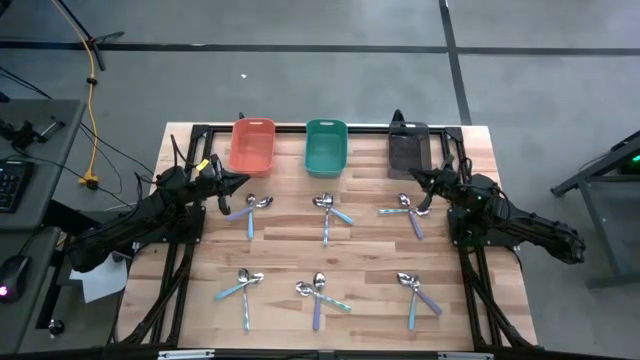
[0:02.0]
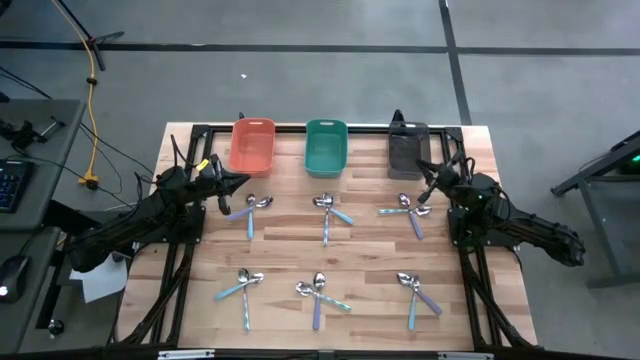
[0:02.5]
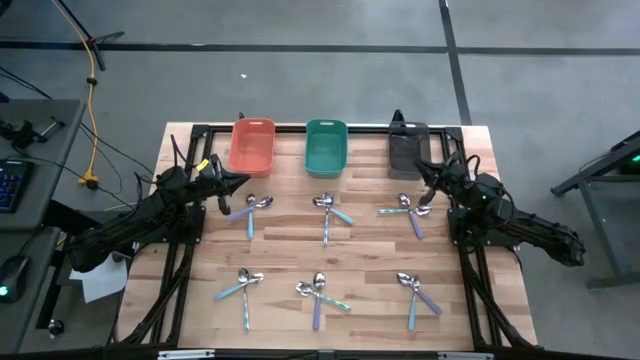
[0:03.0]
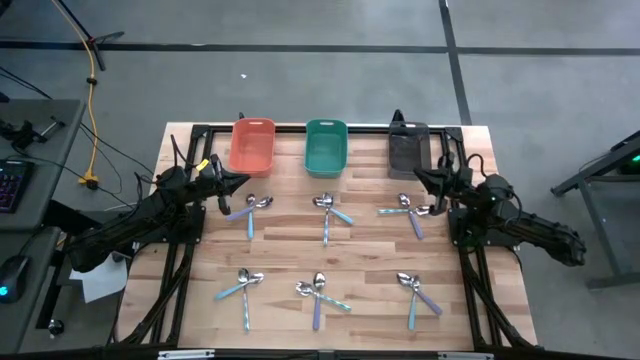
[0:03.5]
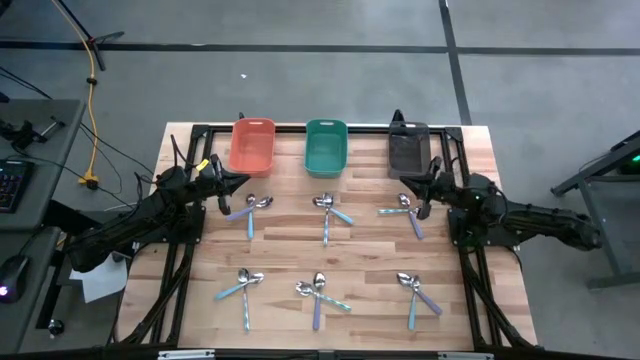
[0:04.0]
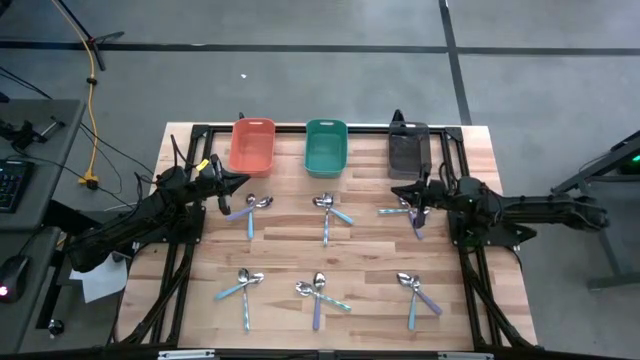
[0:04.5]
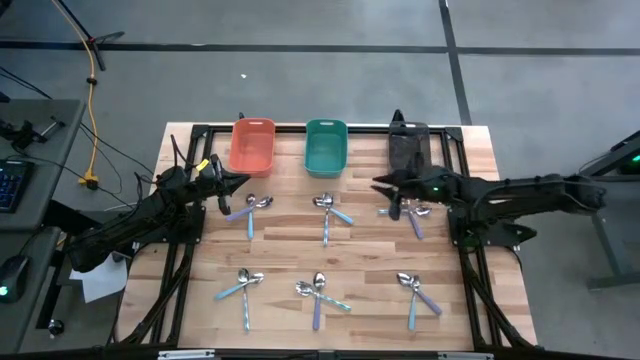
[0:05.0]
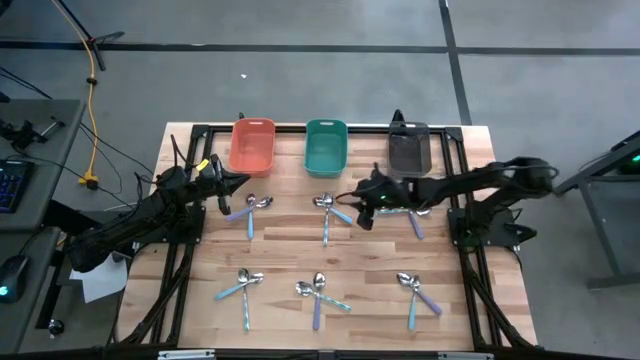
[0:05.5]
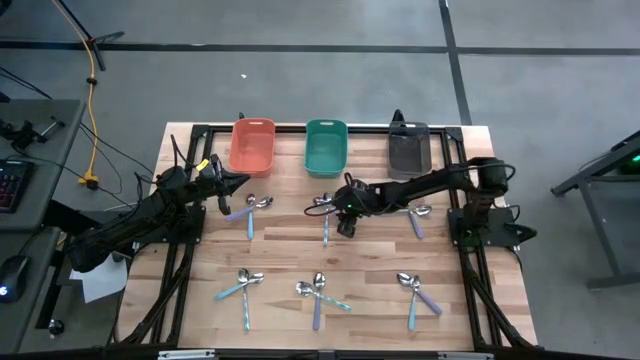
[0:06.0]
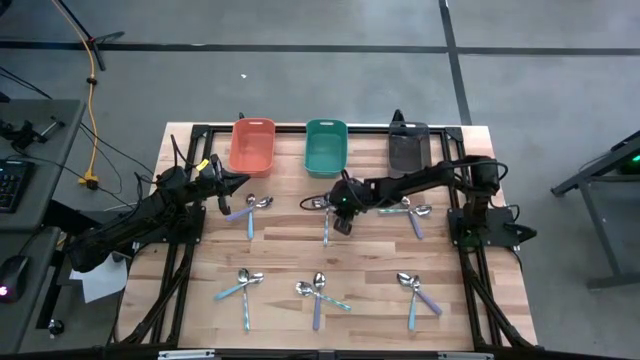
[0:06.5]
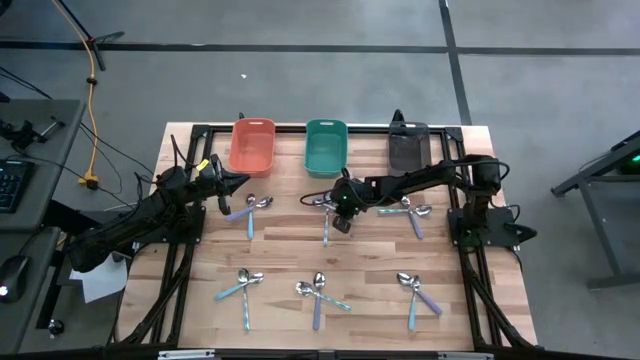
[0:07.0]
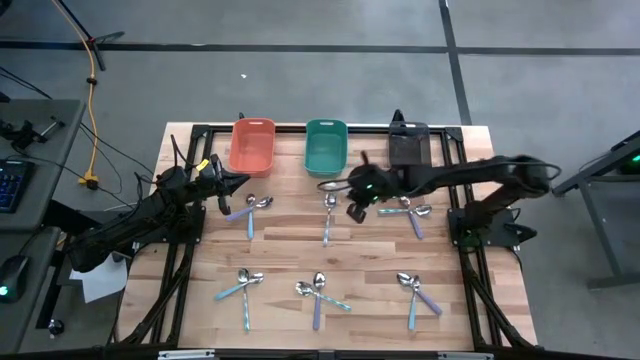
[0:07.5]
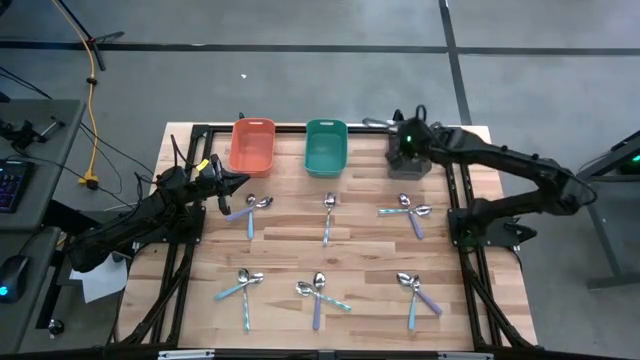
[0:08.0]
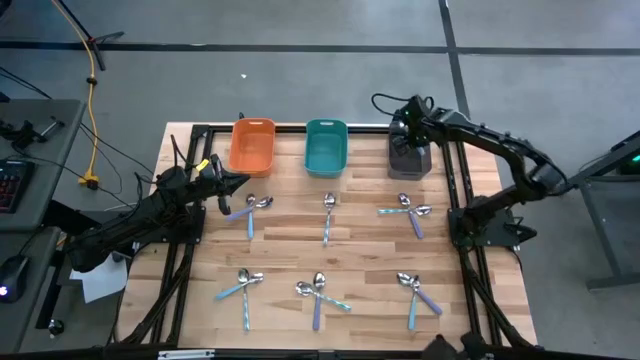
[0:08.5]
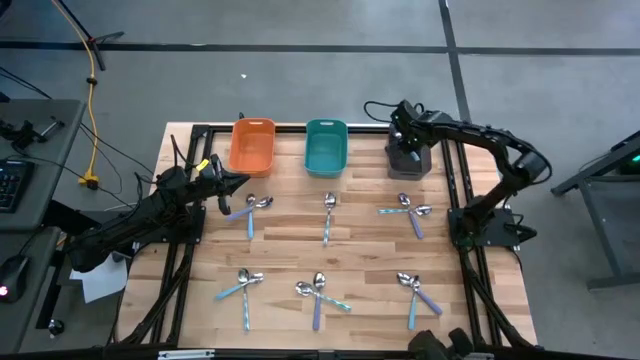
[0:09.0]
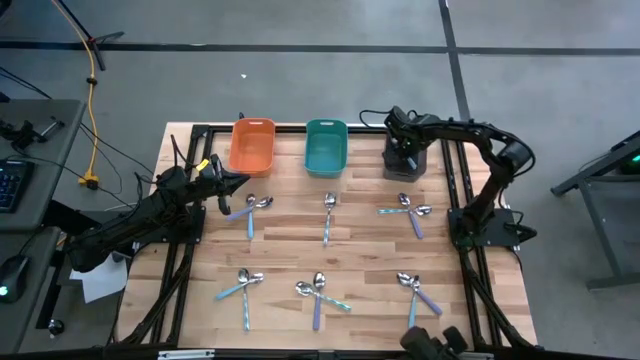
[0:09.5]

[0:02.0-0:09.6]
Task: Sort silverware by color (type)
Put the blue spoon into the black bin

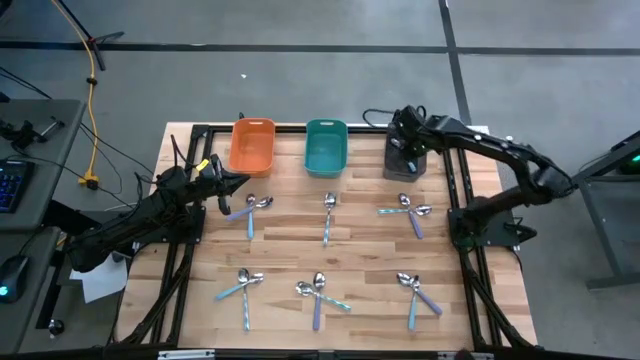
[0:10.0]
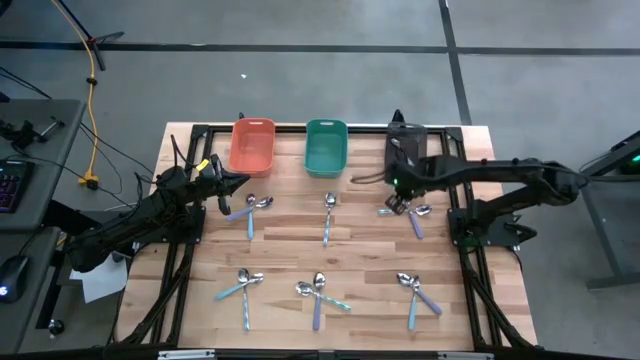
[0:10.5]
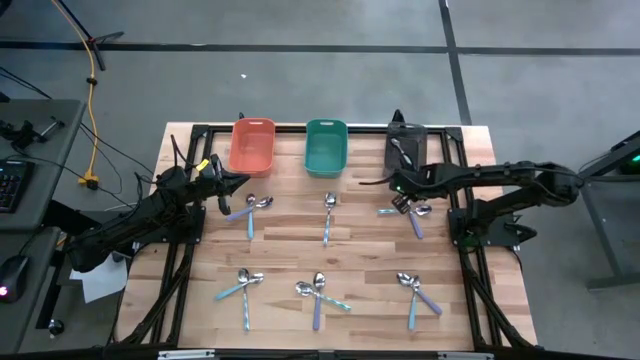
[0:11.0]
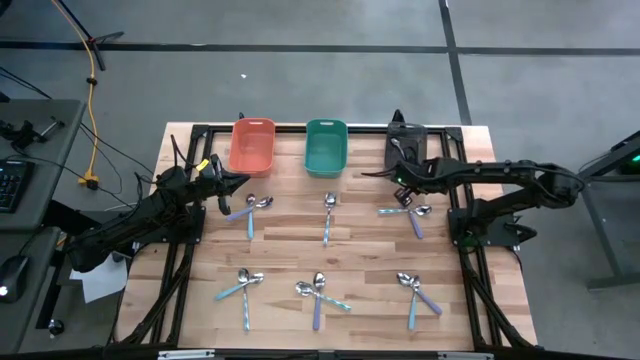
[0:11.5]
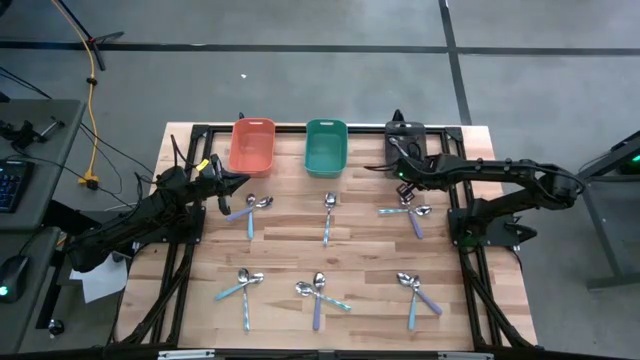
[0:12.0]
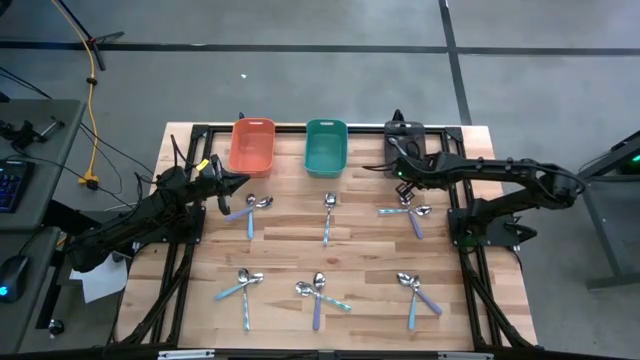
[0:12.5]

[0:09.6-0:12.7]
Adjust the black bin

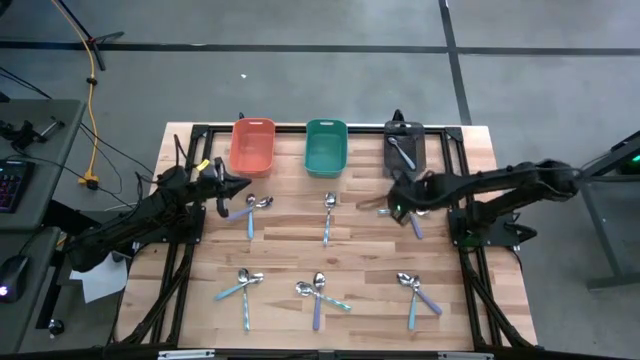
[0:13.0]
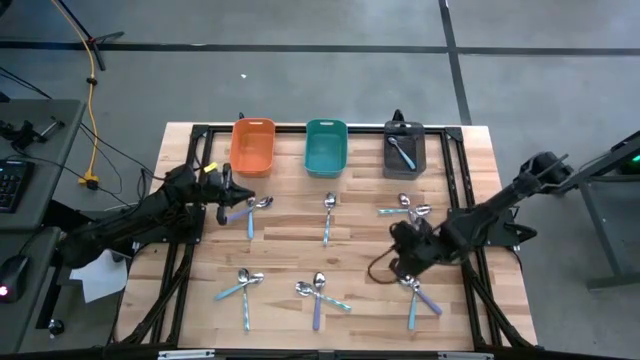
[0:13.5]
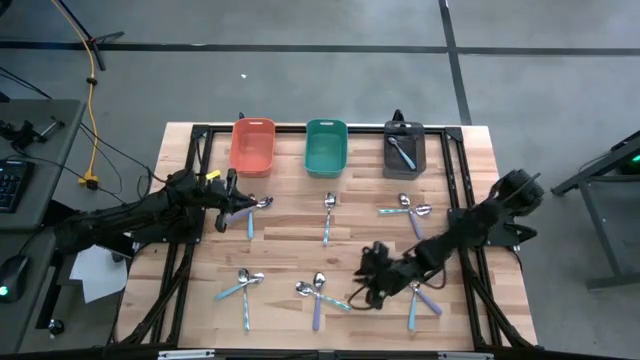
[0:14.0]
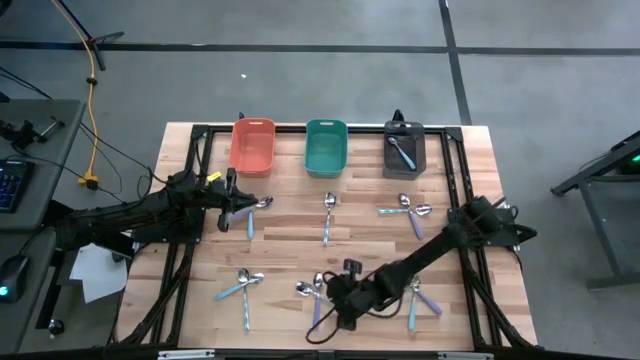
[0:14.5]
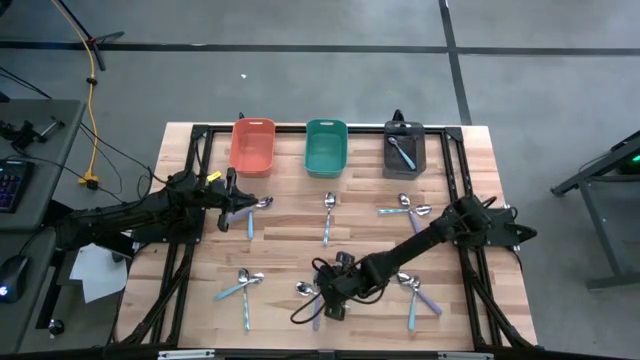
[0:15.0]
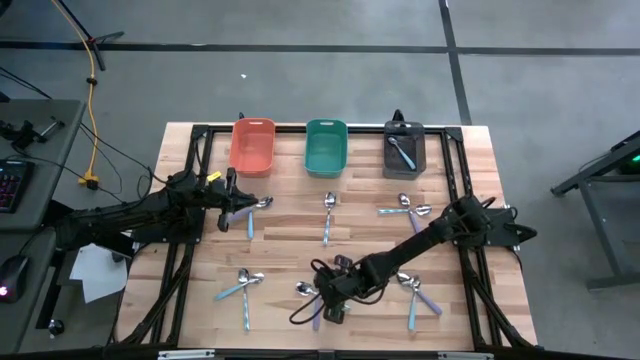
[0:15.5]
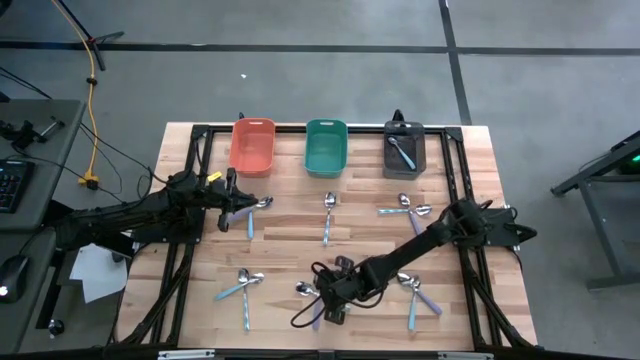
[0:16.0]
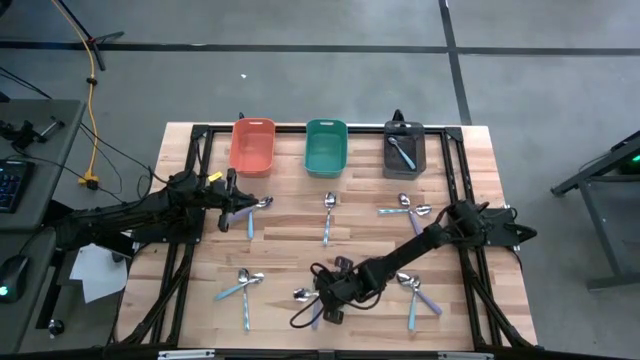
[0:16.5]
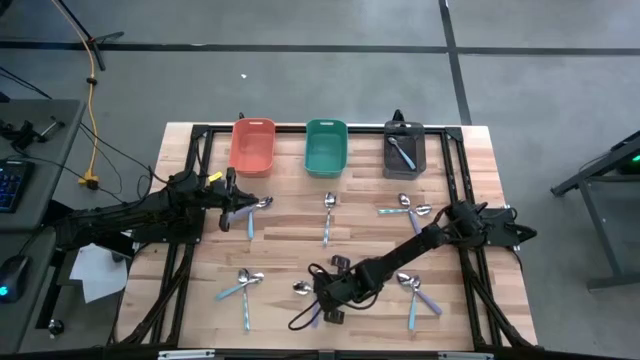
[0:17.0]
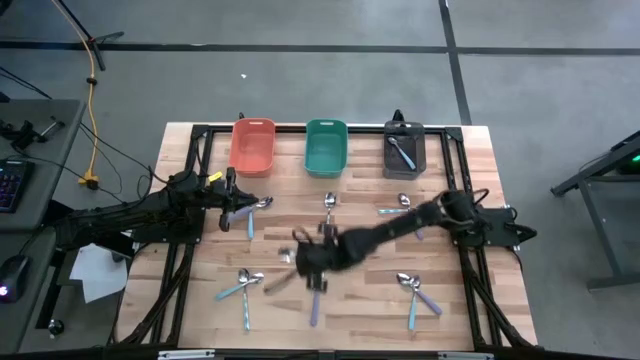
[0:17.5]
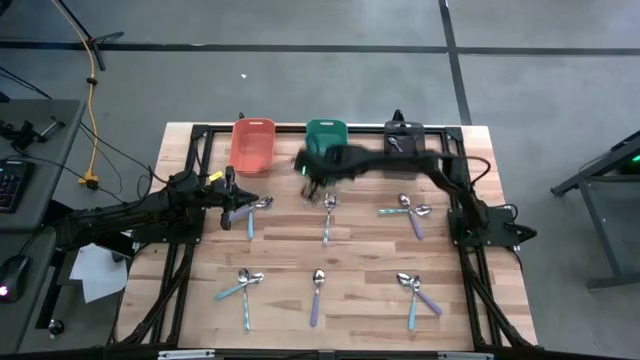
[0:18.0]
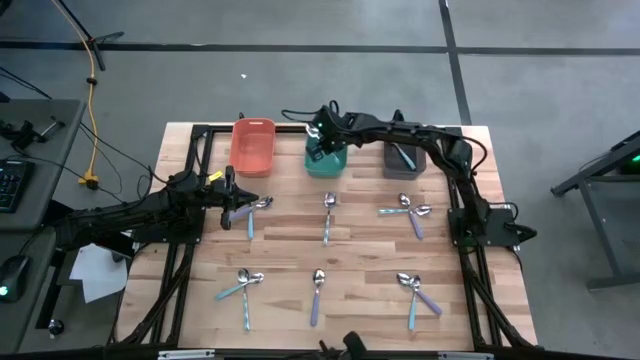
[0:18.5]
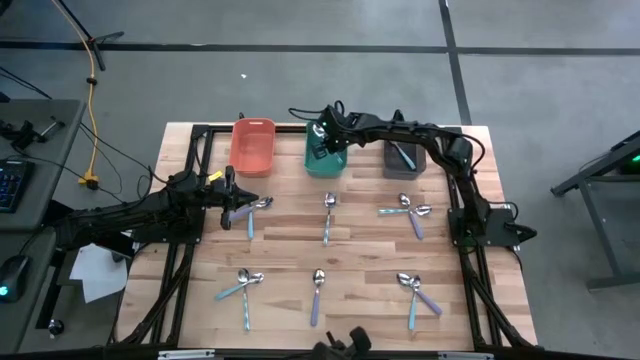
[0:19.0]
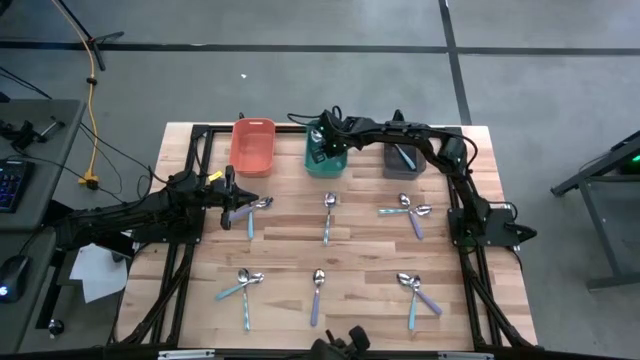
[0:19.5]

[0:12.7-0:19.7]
Put the blue patterned spoon into the green bin
